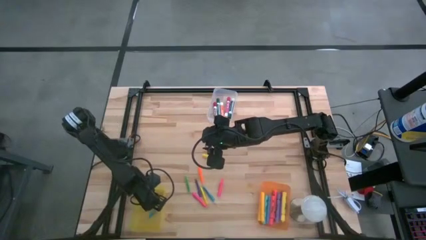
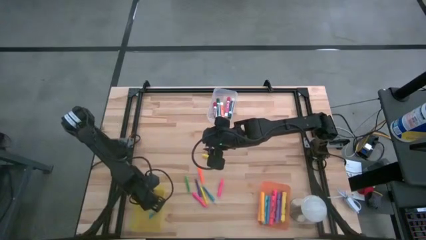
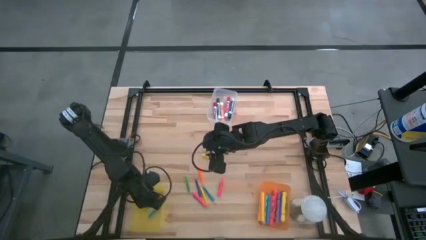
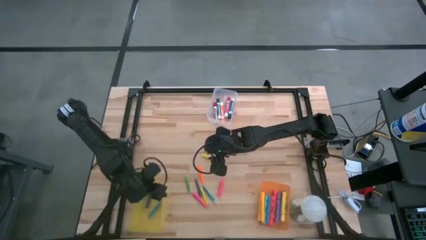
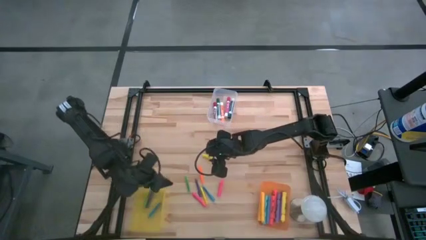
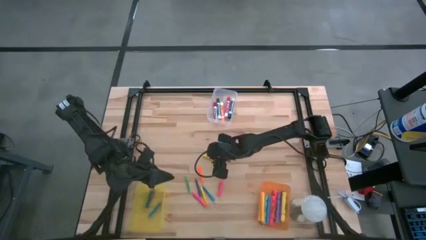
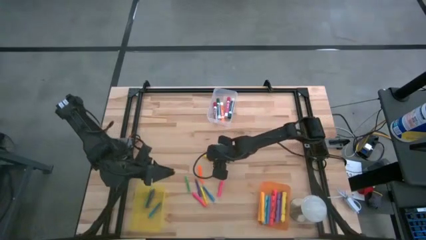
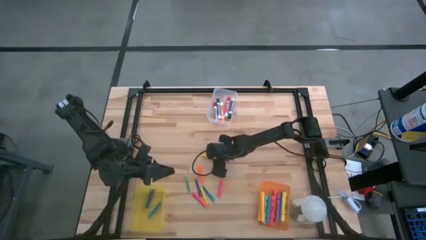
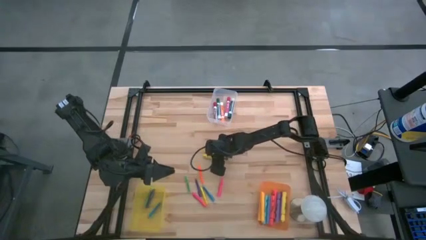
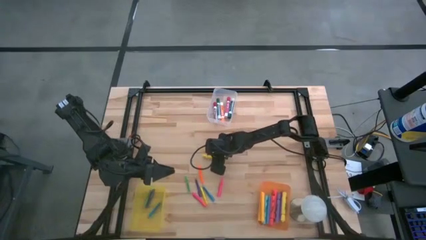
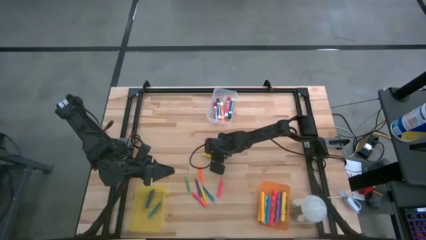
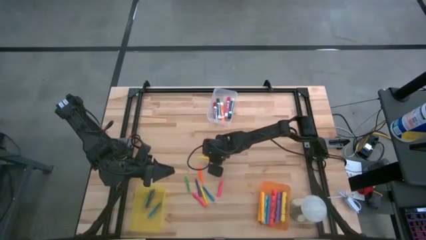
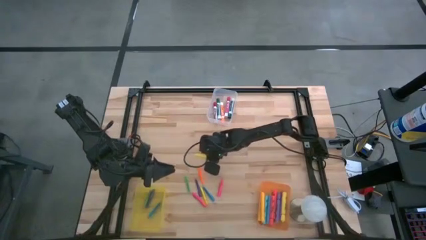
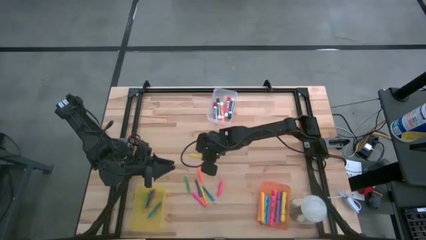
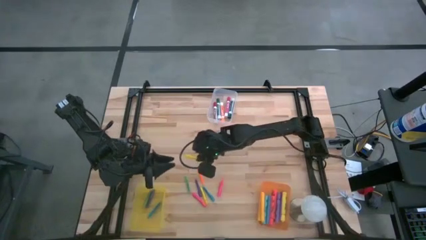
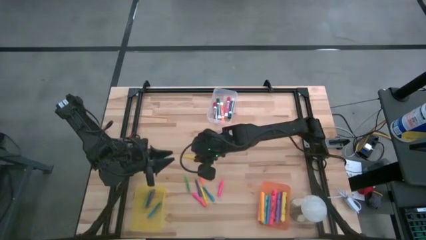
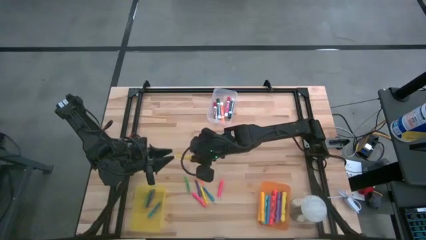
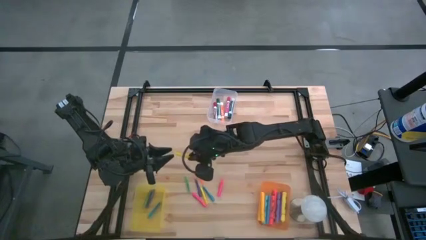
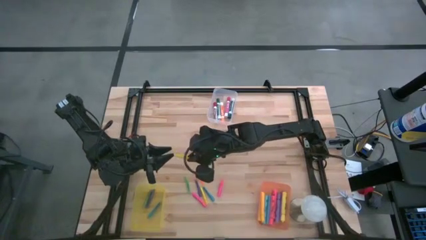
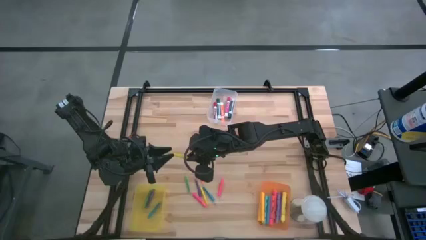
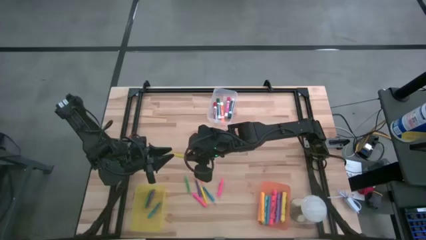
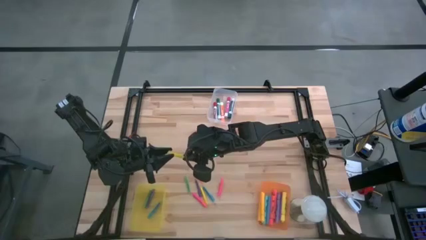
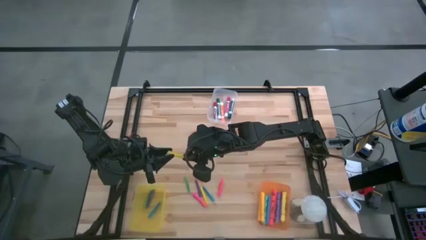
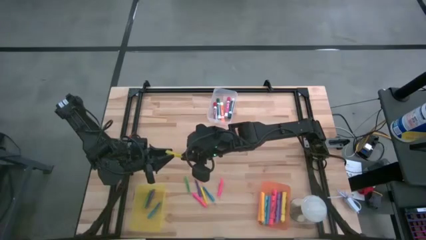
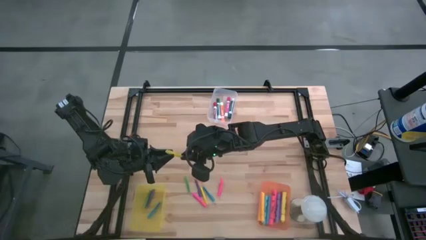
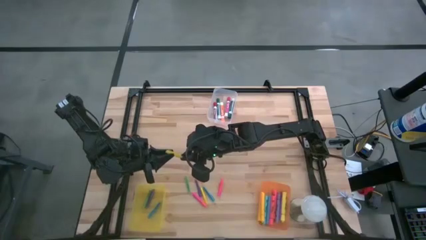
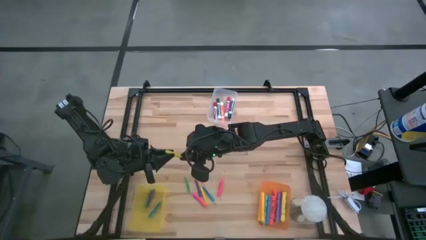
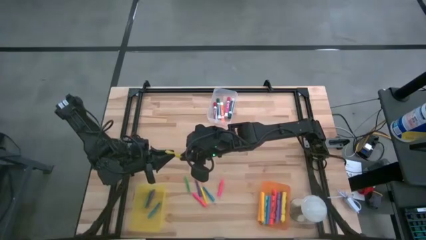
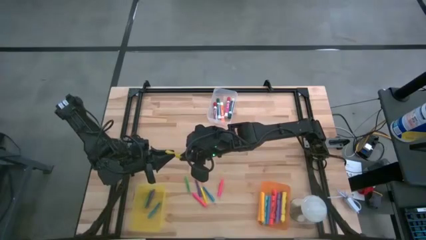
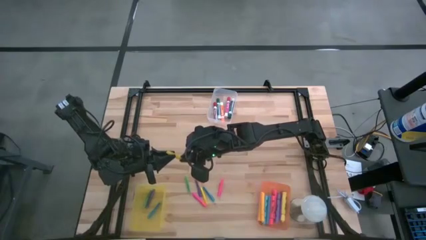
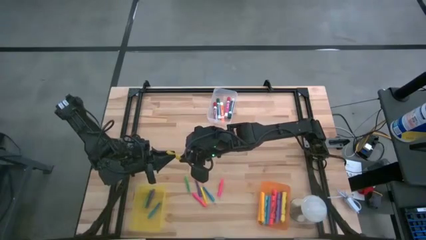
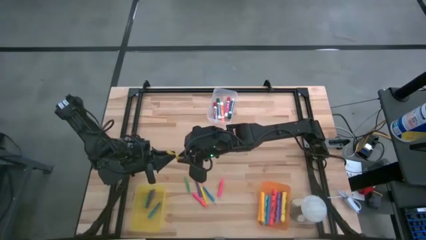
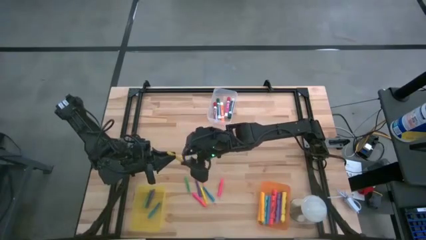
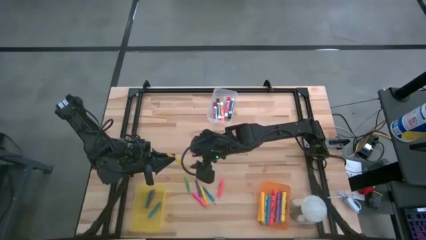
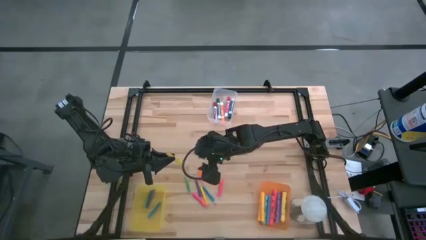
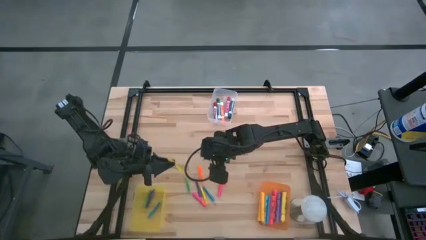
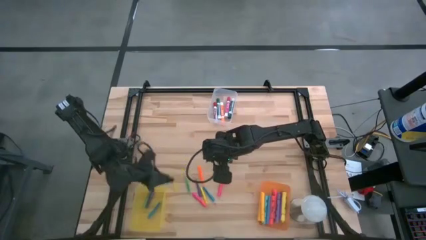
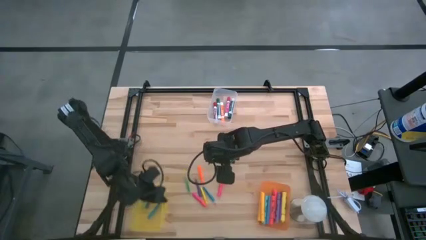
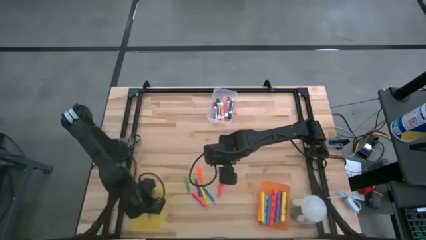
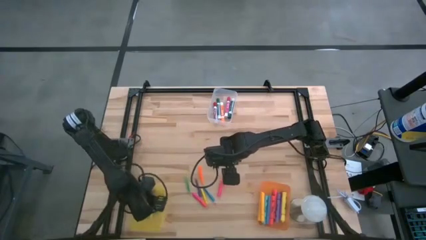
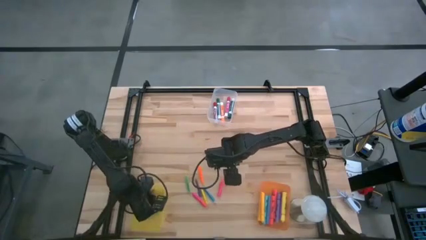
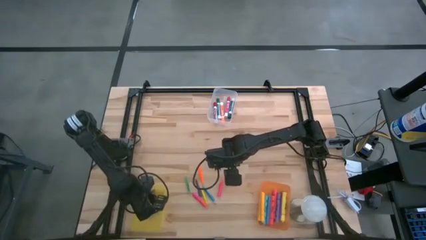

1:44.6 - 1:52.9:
Task: Pick & Place Markers
Put the top yellow highlighter into the yellow bin

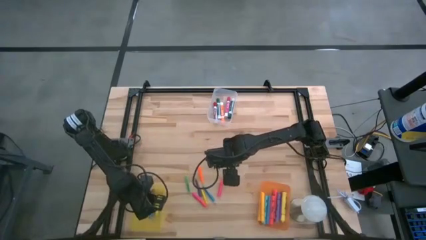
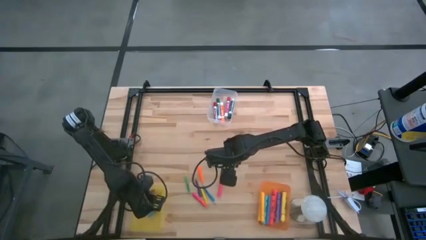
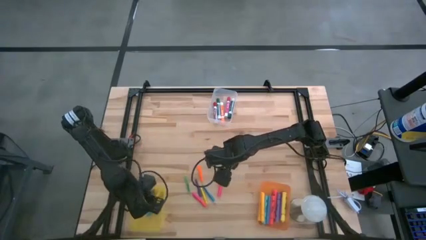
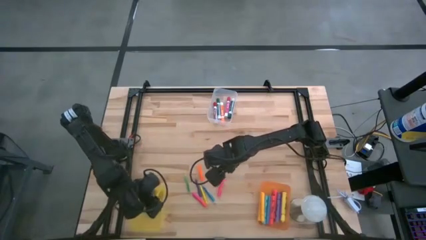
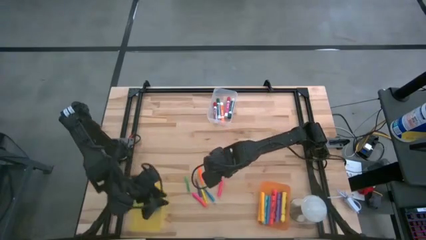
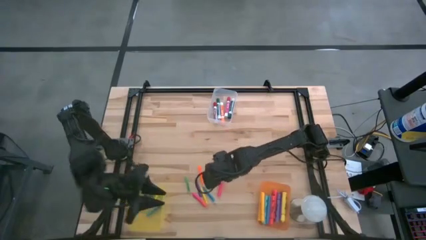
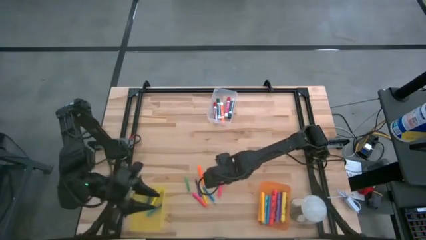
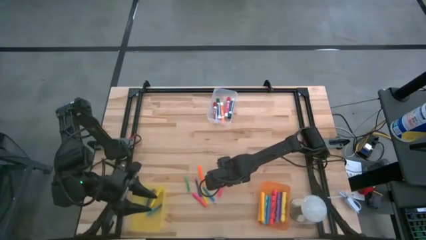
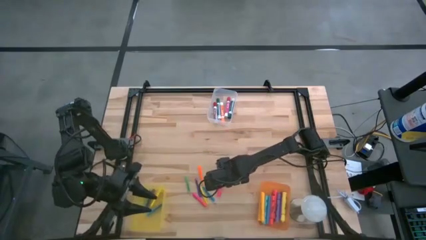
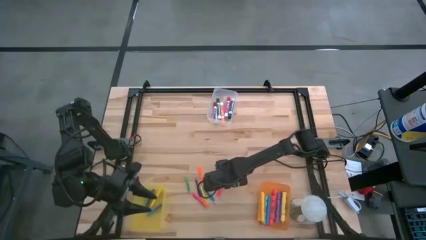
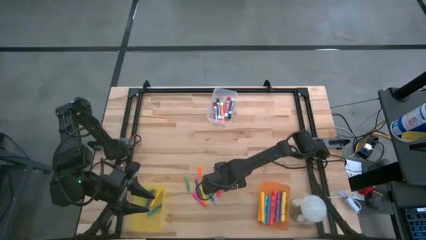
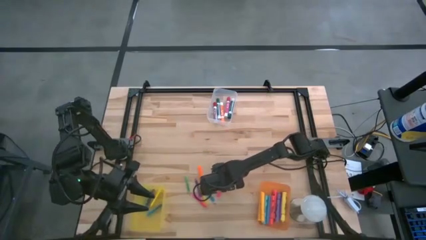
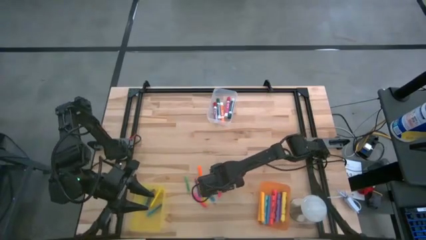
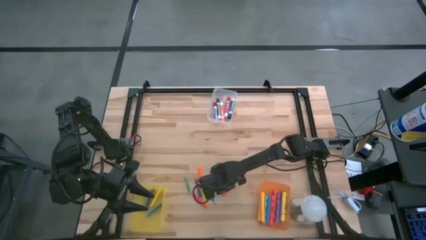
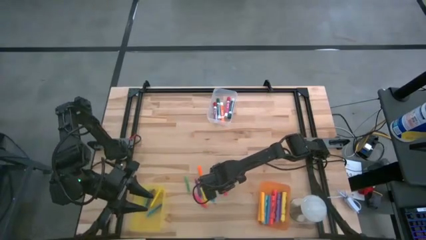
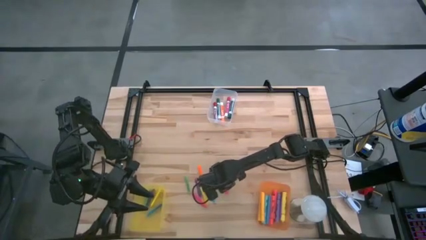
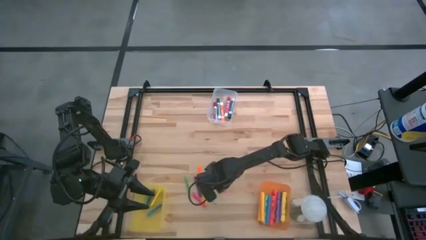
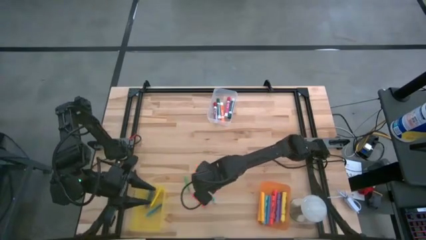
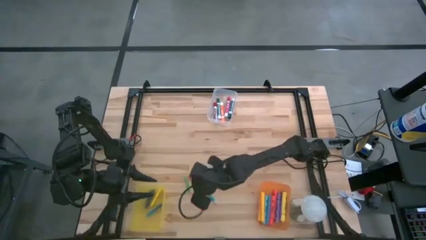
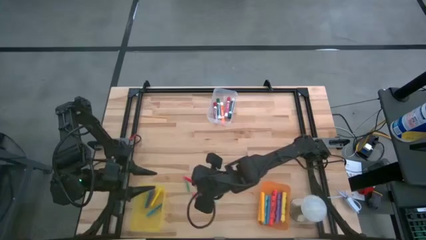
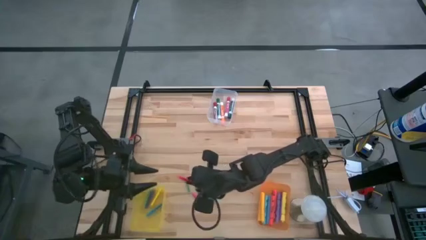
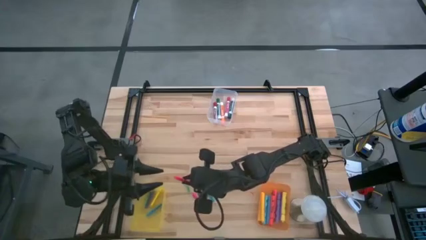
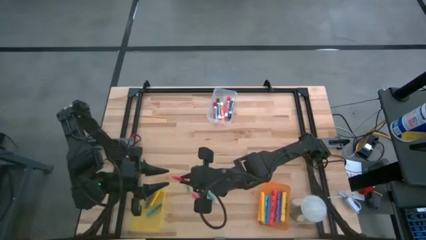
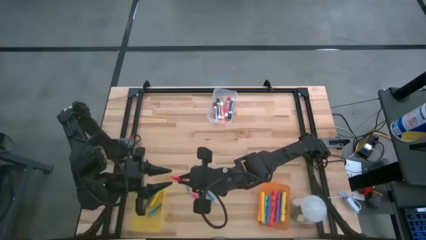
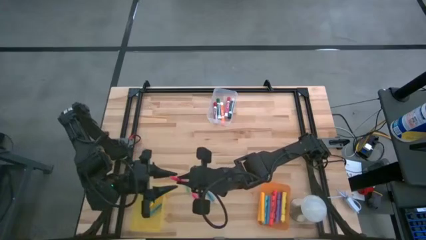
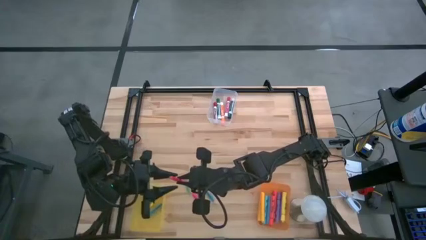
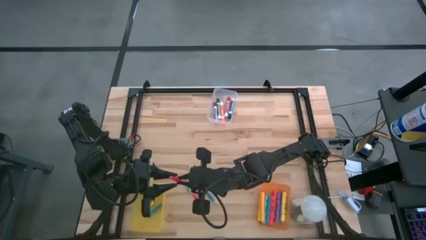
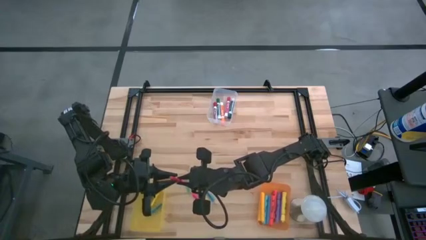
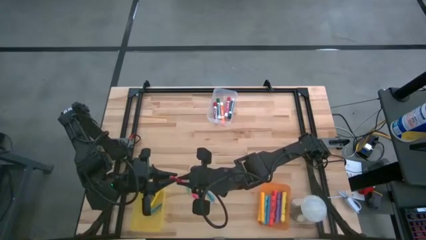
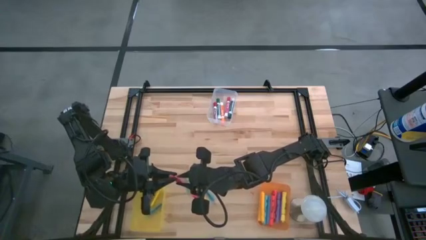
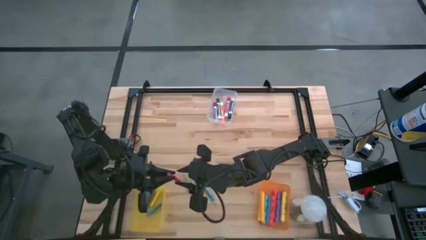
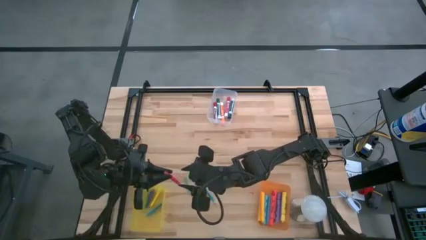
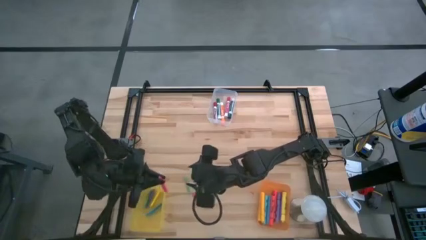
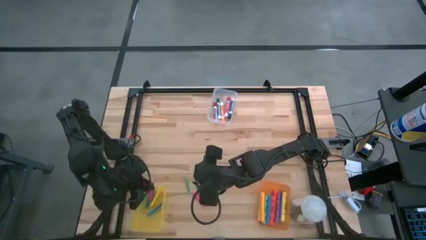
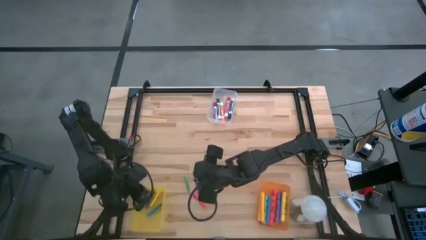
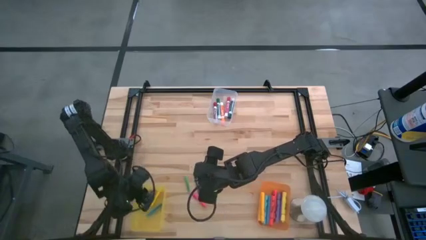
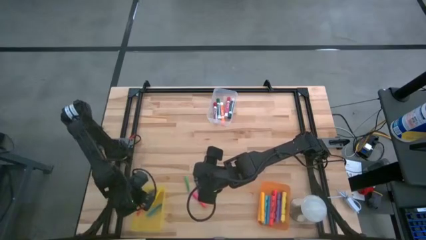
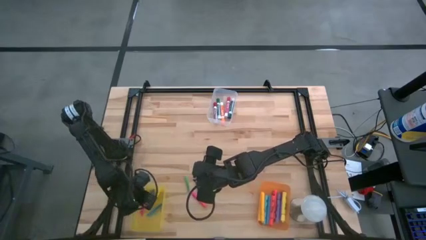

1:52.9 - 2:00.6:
Put the right pink highlighter into the yellow bin
